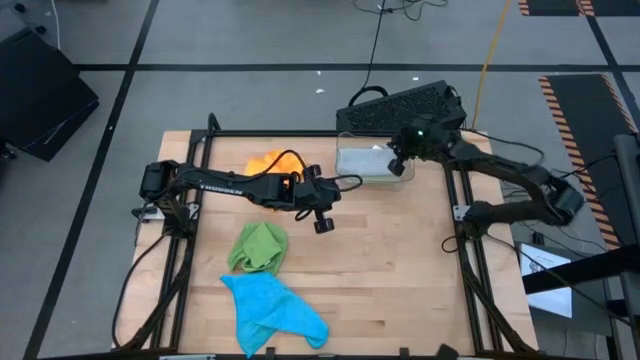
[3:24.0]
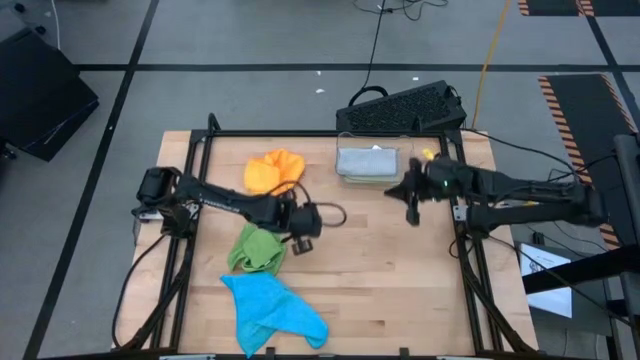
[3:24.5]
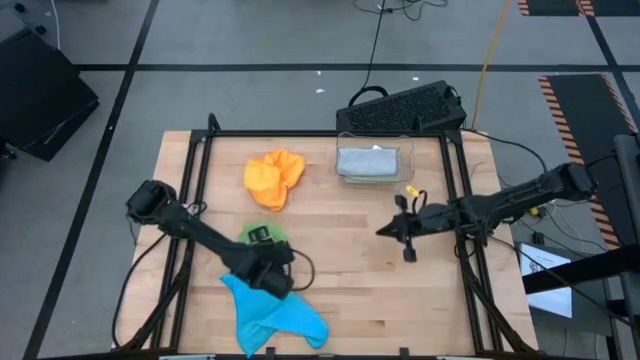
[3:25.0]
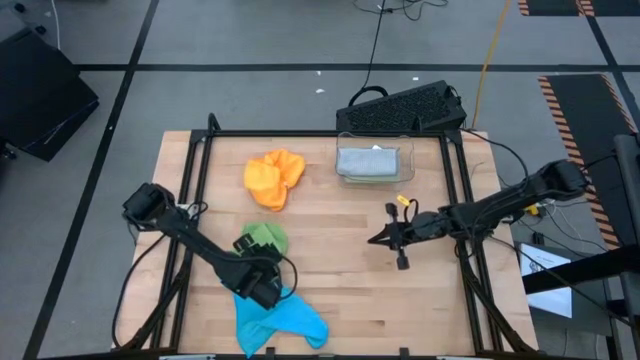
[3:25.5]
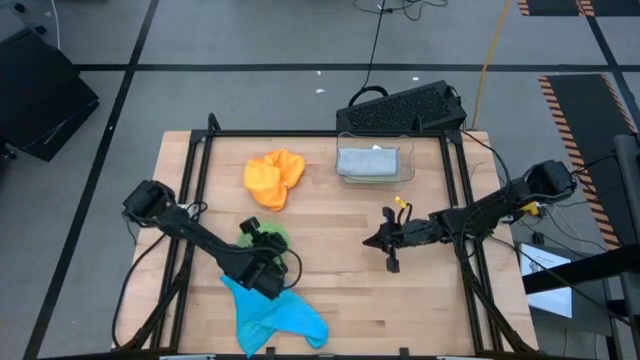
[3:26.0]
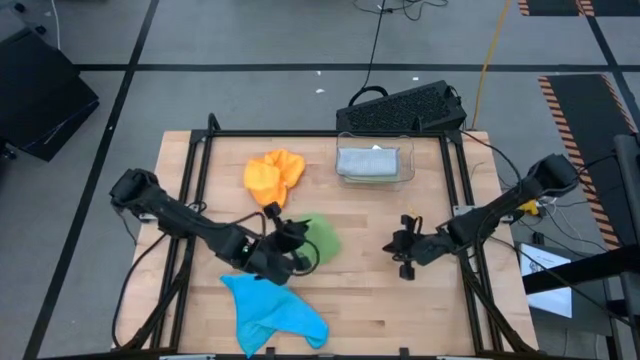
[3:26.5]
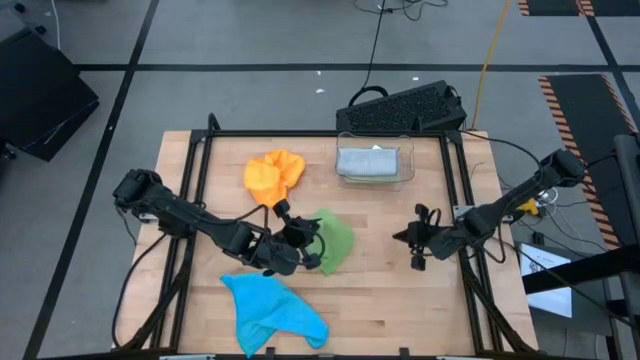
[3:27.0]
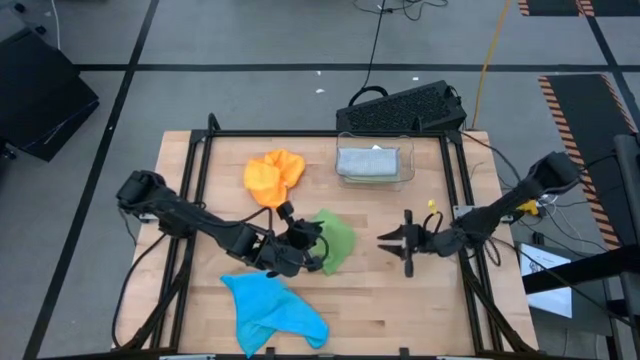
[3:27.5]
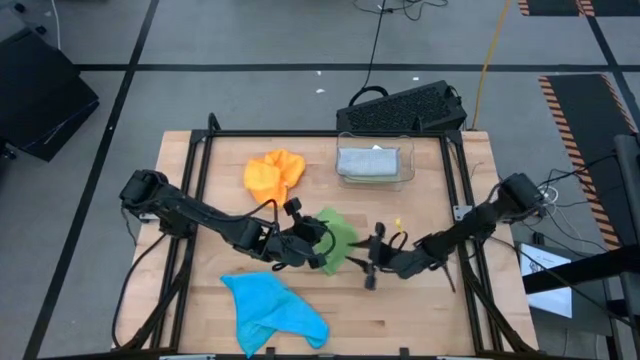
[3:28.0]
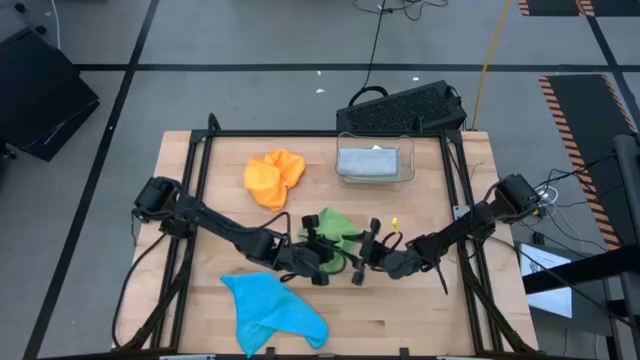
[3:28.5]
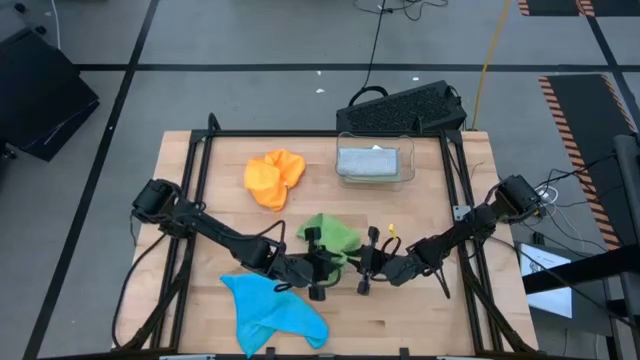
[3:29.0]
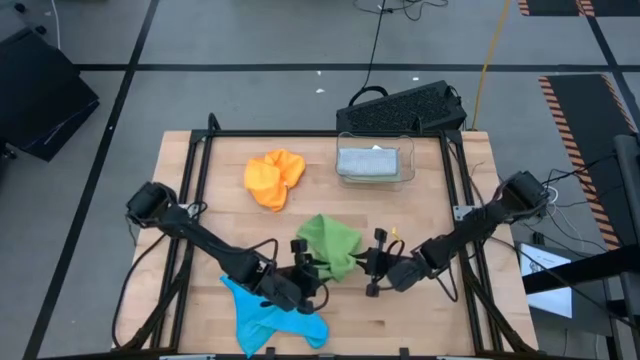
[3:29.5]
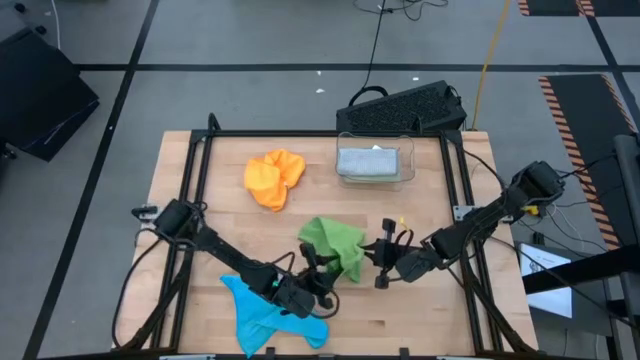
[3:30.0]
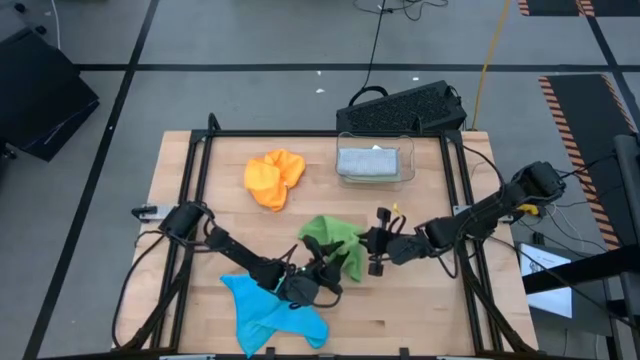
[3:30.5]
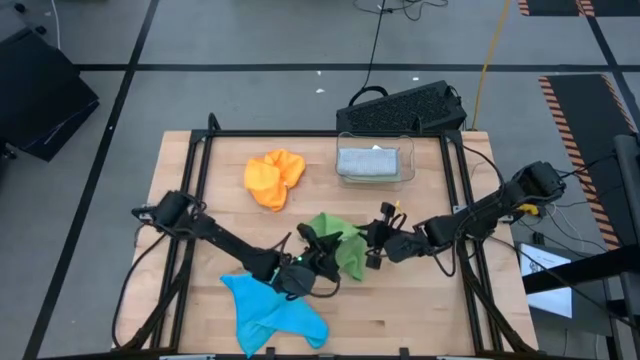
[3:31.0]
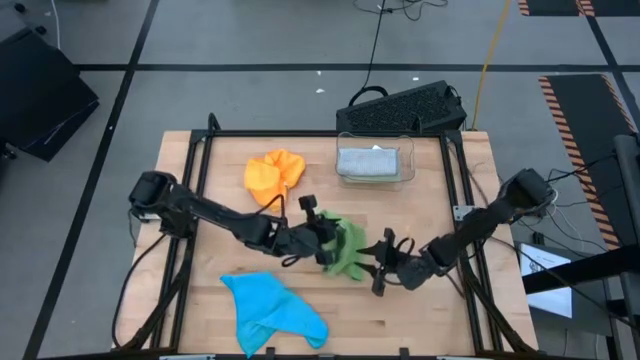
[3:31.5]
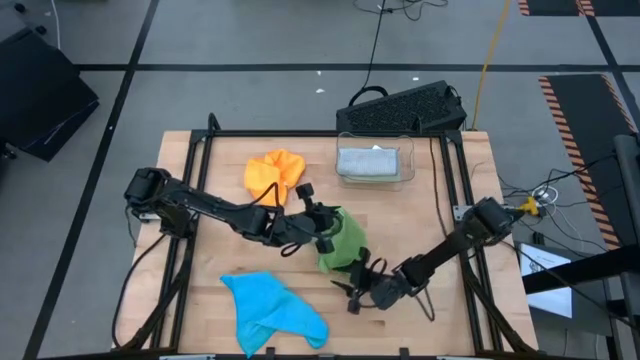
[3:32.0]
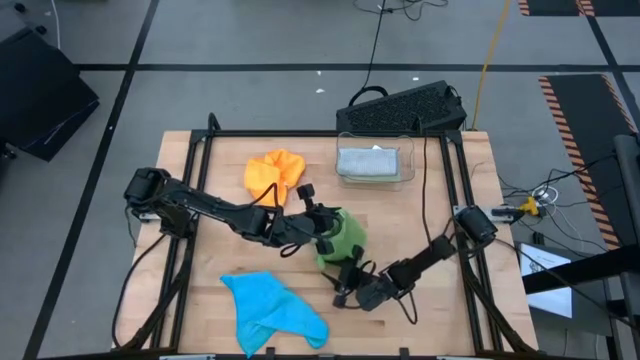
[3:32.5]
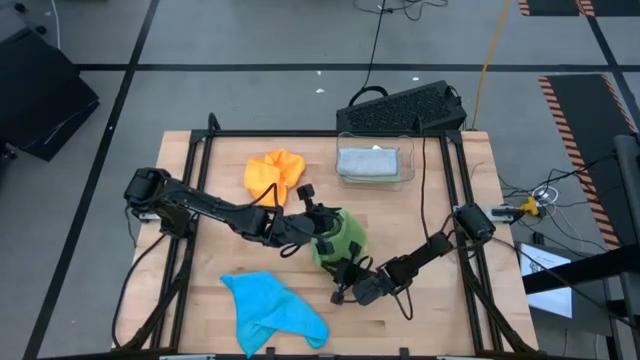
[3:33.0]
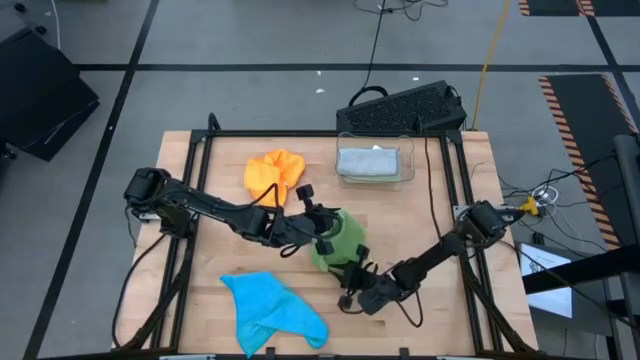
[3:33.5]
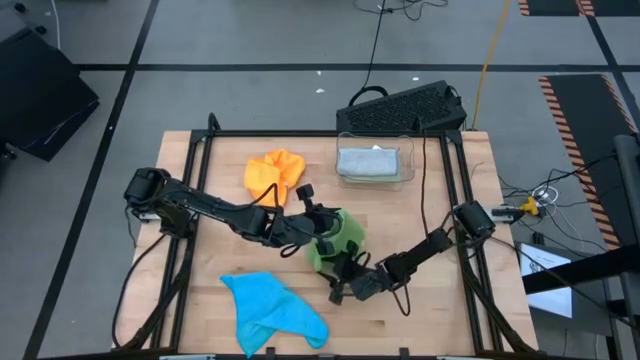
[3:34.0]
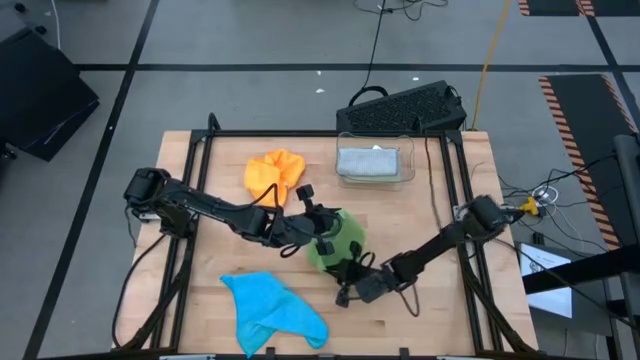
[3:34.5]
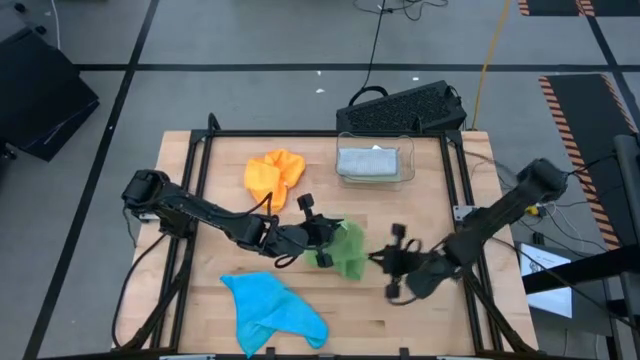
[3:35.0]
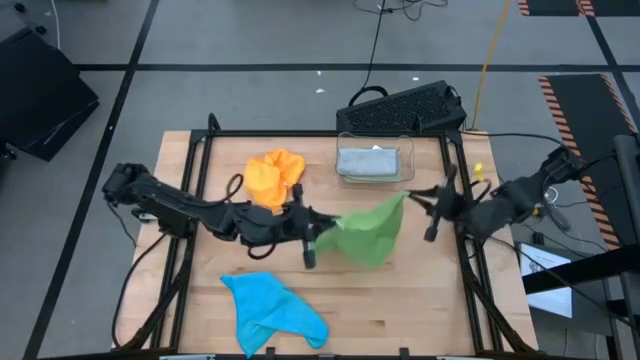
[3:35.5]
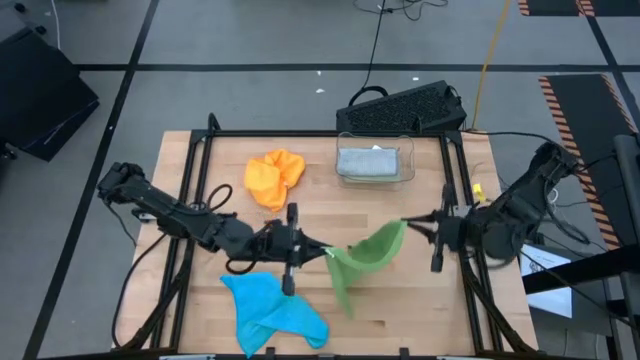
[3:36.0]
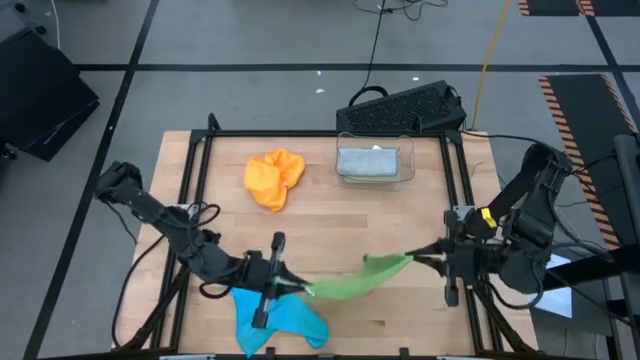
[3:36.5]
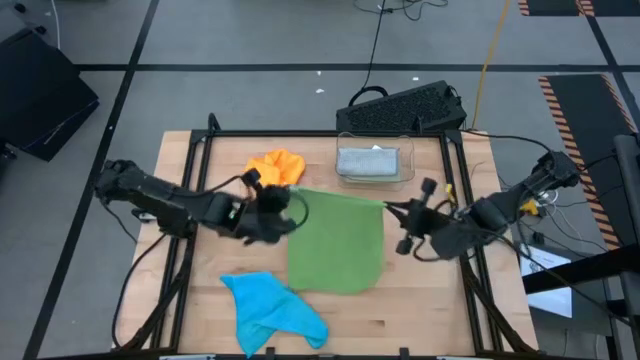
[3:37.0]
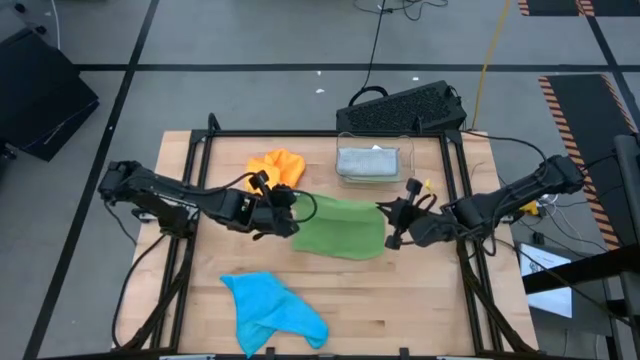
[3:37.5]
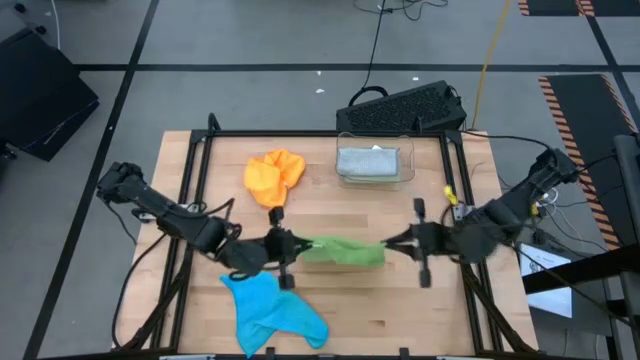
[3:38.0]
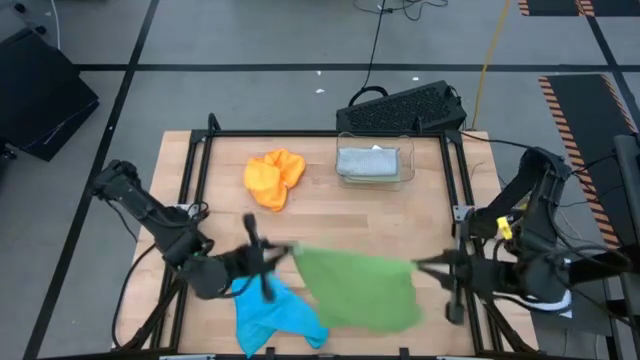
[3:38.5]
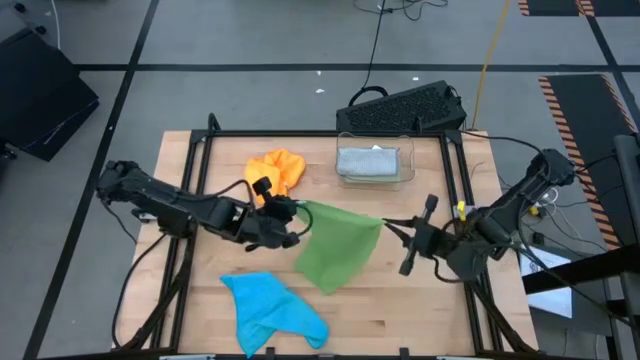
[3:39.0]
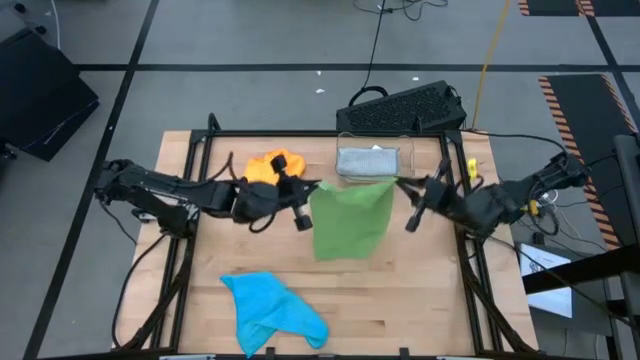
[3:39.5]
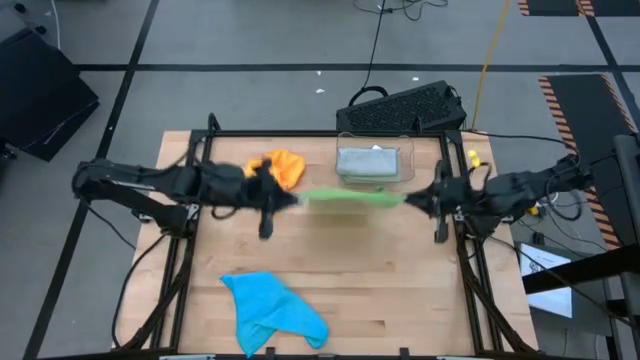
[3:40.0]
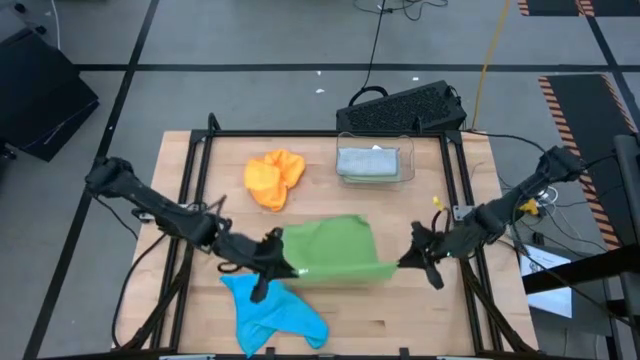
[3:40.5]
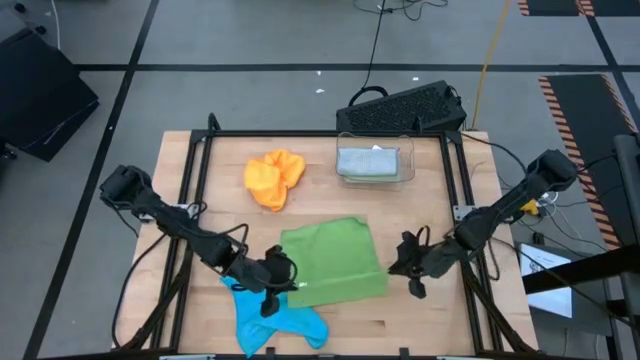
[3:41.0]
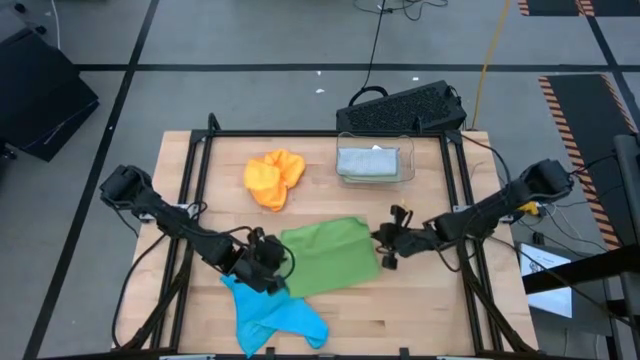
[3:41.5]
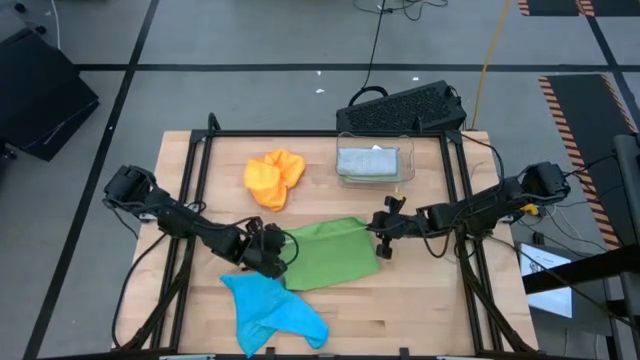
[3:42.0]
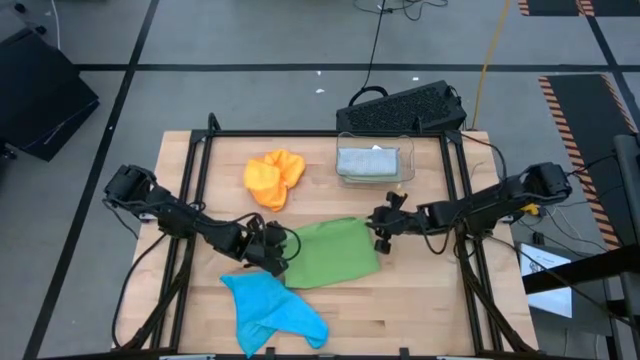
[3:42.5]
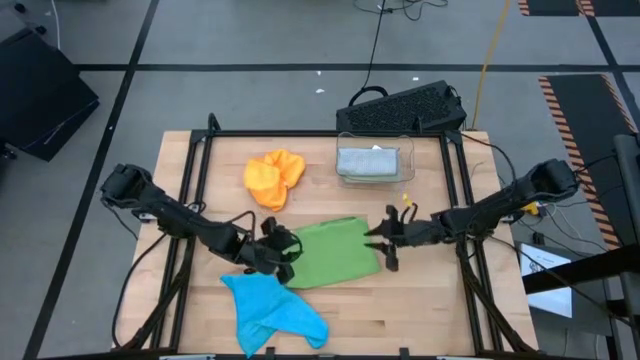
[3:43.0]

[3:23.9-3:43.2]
Task: Fold microfiber towels
Fold the green microfiber towel

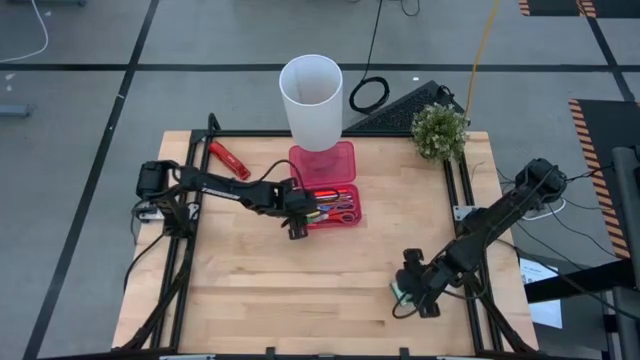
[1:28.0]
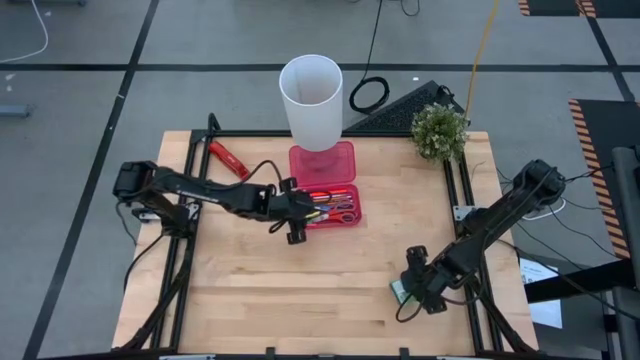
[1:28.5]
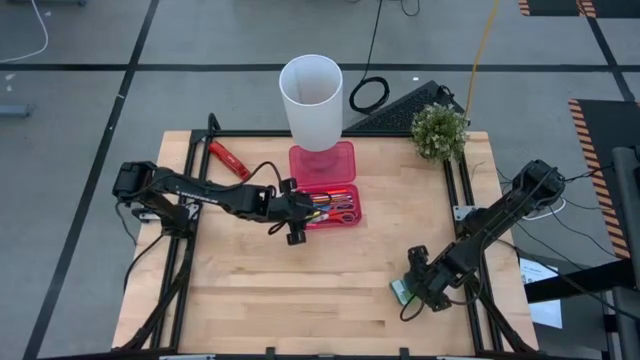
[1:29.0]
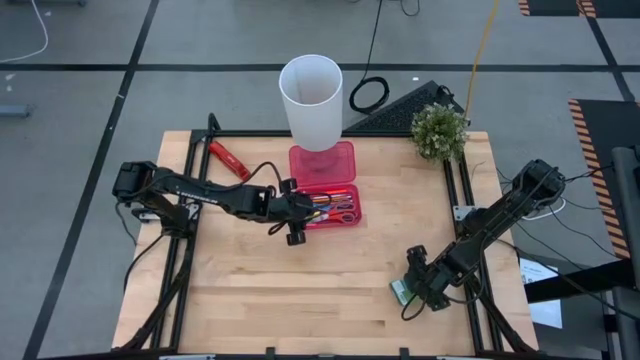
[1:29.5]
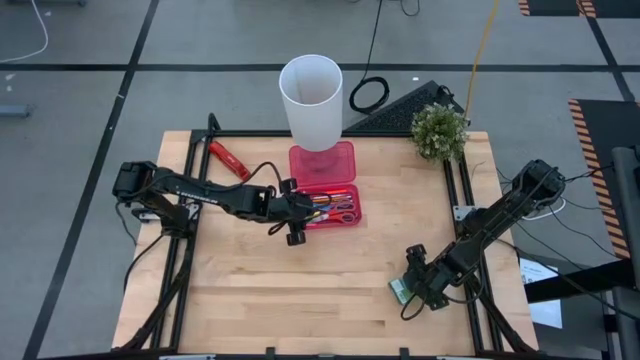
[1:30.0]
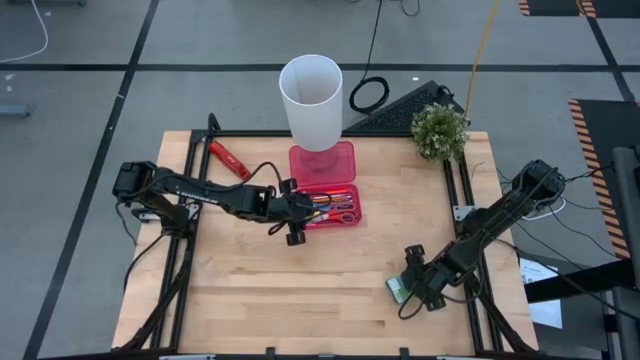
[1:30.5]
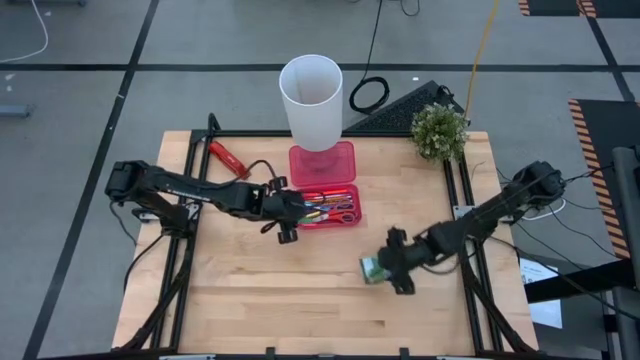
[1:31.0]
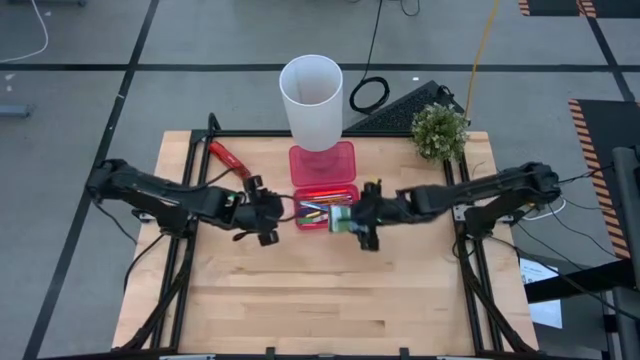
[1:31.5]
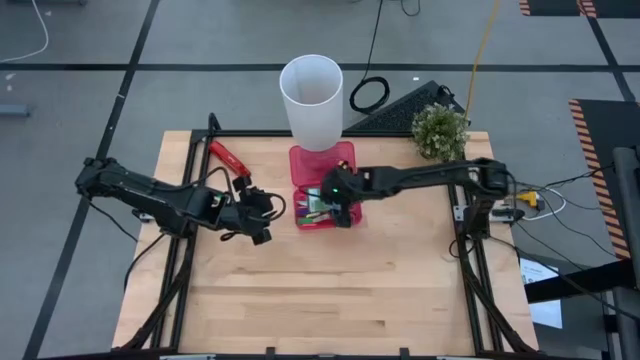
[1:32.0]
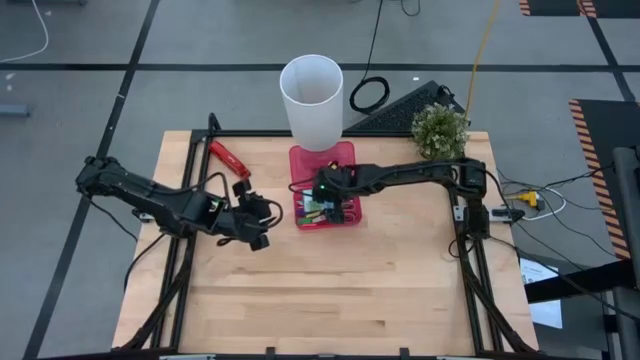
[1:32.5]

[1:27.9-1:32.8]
Task: Pack school essentials
Put the crayon box into the pink supply box
